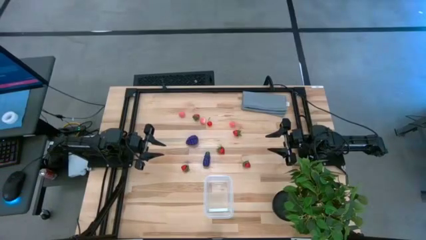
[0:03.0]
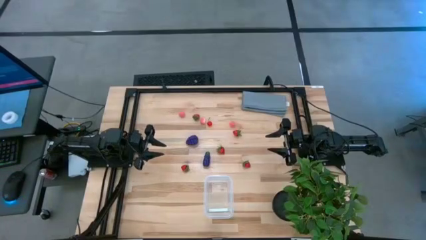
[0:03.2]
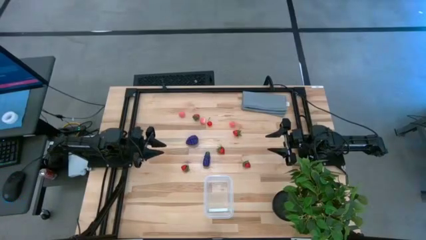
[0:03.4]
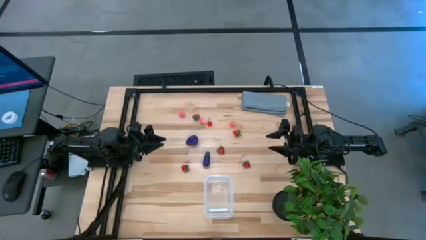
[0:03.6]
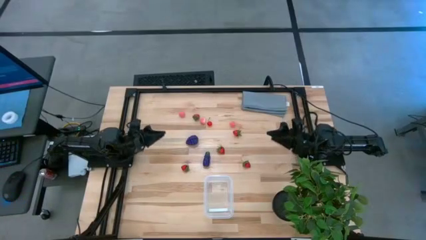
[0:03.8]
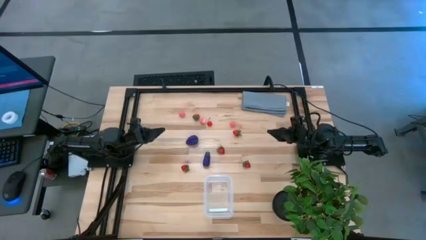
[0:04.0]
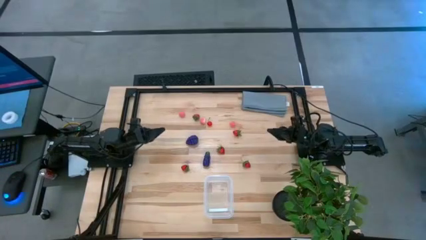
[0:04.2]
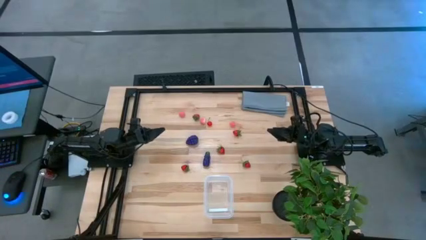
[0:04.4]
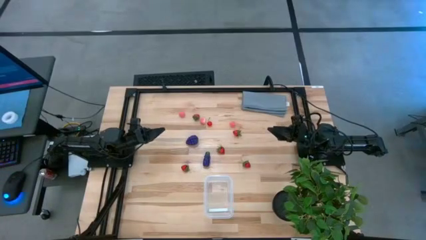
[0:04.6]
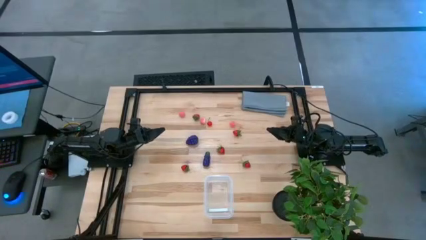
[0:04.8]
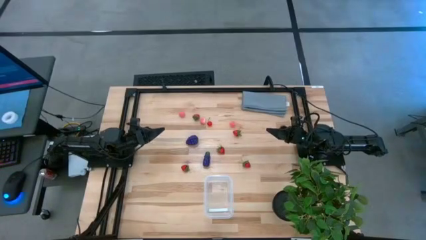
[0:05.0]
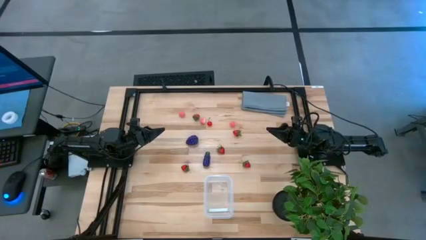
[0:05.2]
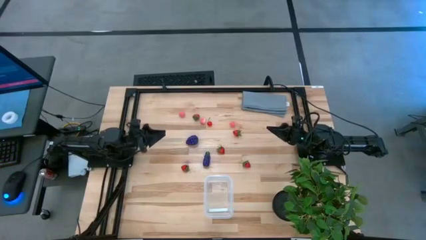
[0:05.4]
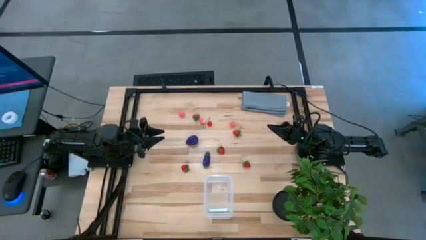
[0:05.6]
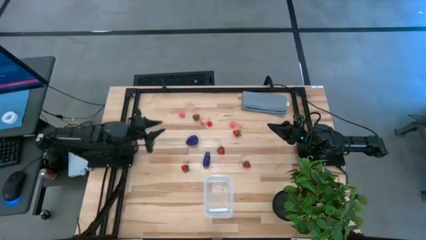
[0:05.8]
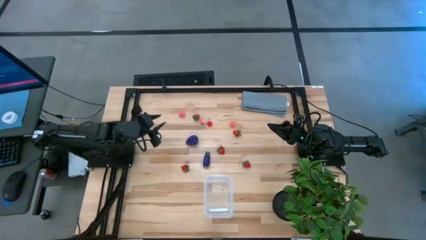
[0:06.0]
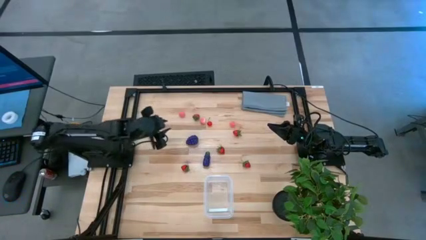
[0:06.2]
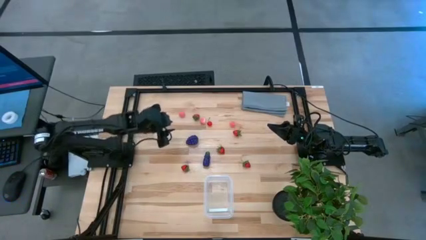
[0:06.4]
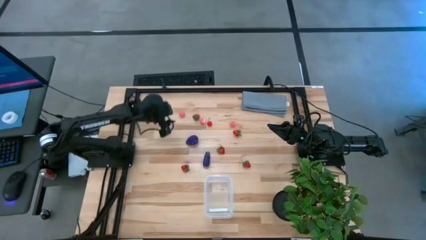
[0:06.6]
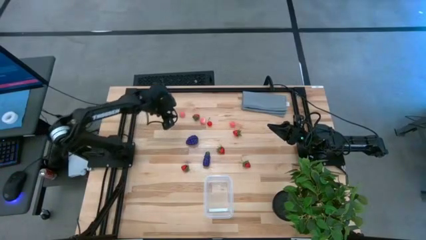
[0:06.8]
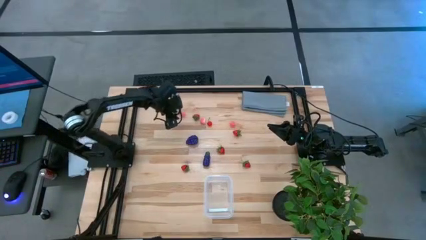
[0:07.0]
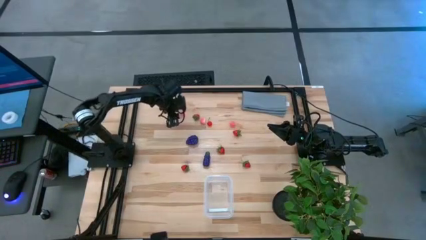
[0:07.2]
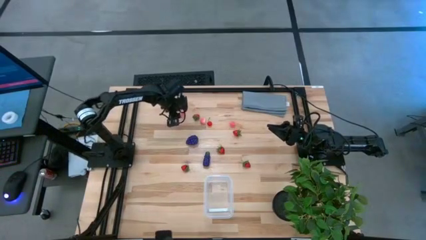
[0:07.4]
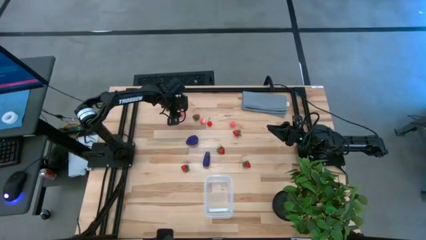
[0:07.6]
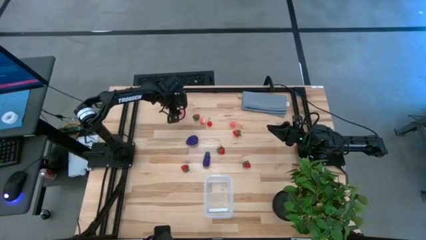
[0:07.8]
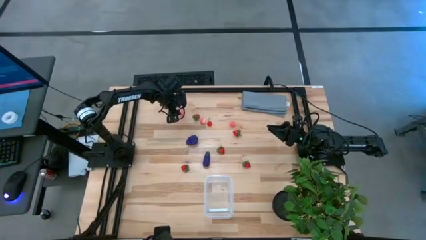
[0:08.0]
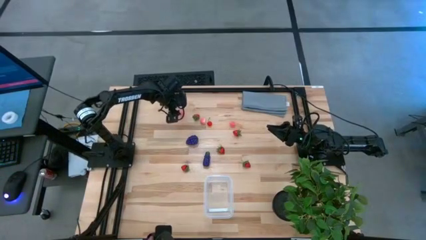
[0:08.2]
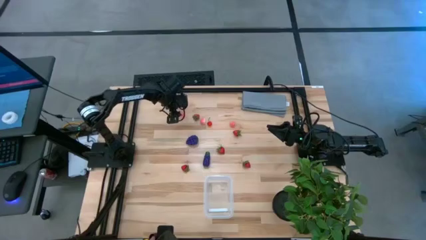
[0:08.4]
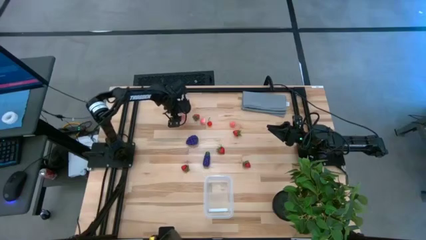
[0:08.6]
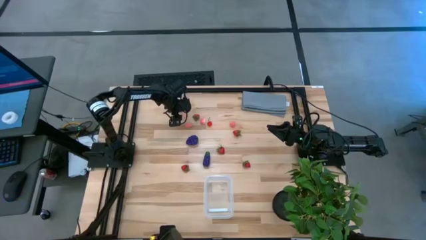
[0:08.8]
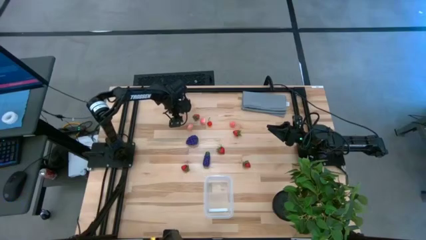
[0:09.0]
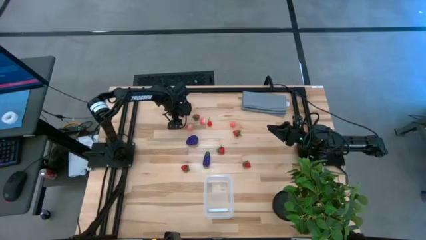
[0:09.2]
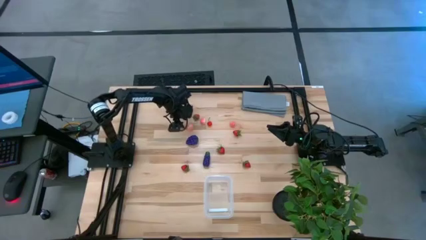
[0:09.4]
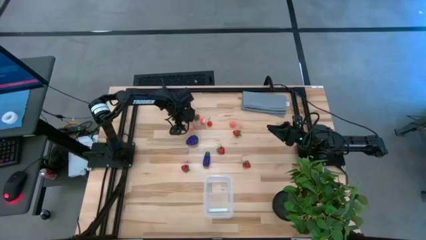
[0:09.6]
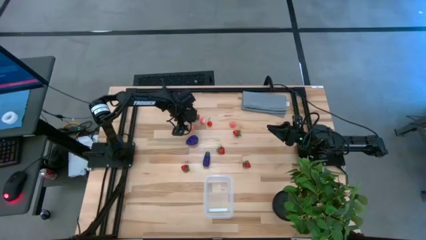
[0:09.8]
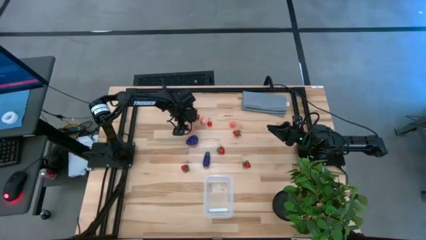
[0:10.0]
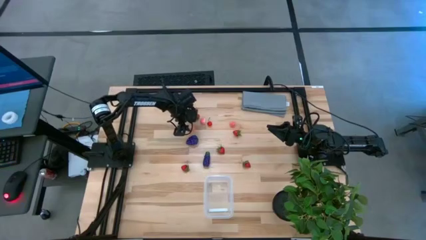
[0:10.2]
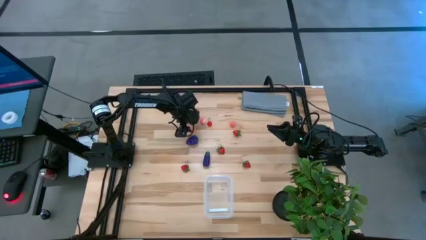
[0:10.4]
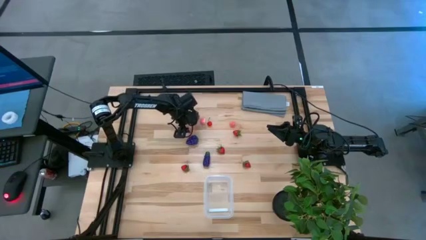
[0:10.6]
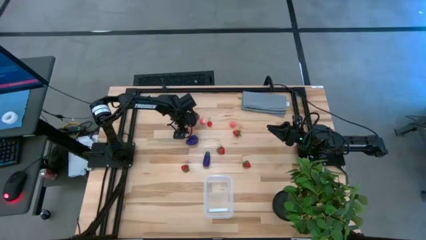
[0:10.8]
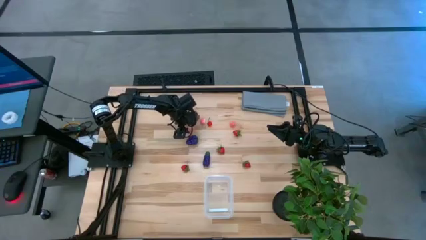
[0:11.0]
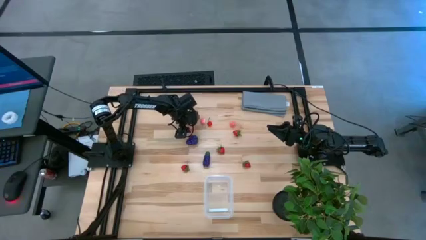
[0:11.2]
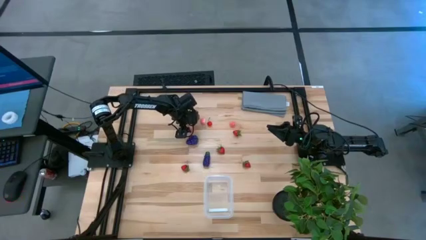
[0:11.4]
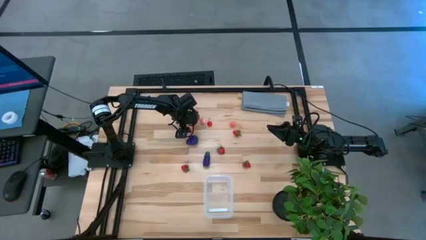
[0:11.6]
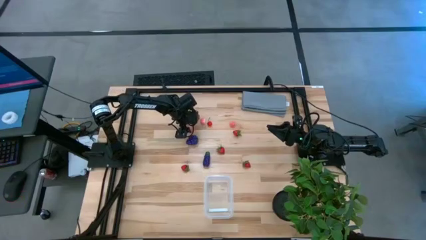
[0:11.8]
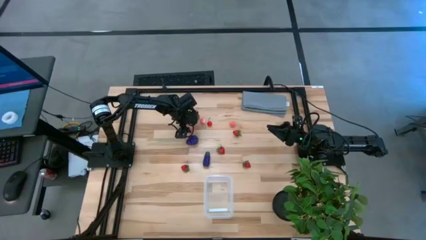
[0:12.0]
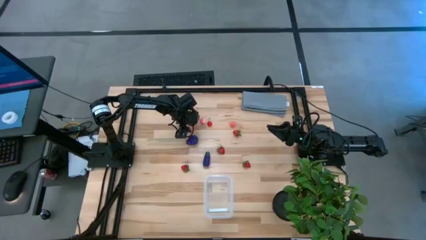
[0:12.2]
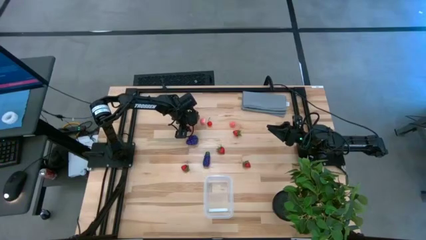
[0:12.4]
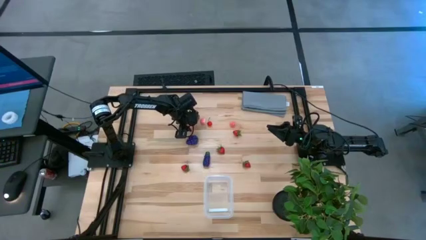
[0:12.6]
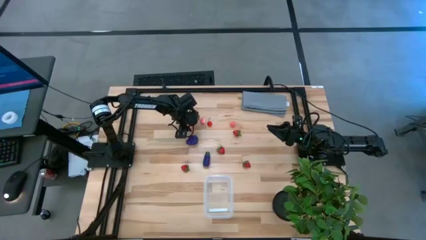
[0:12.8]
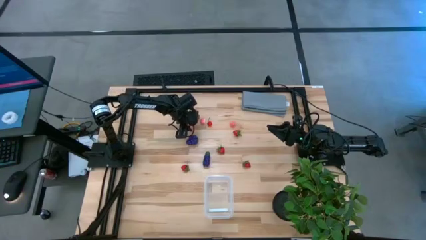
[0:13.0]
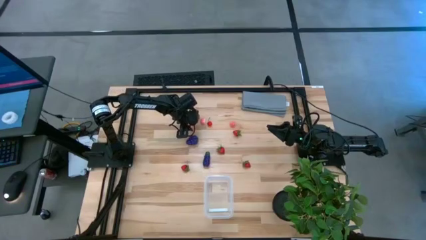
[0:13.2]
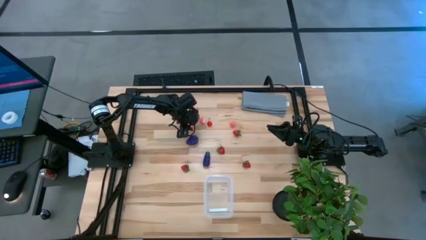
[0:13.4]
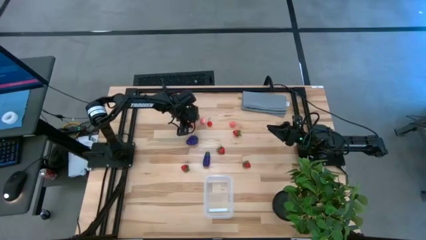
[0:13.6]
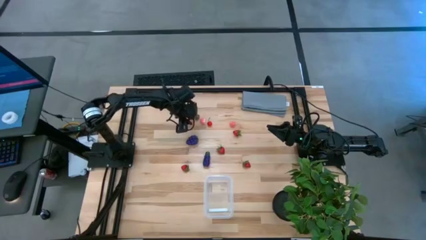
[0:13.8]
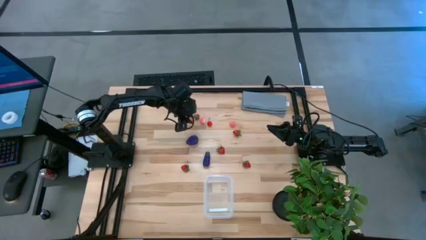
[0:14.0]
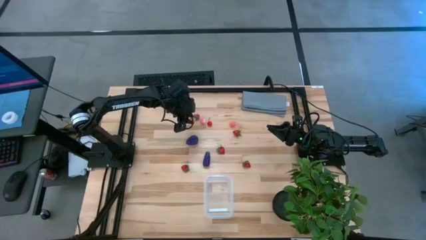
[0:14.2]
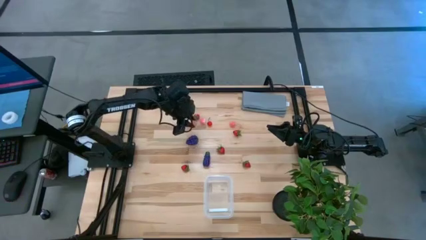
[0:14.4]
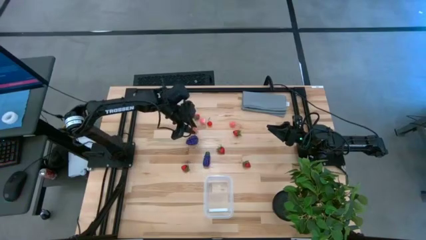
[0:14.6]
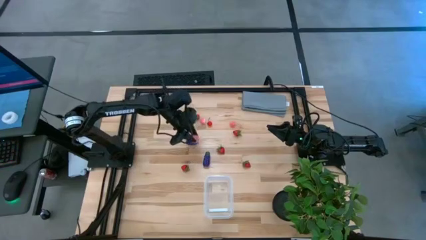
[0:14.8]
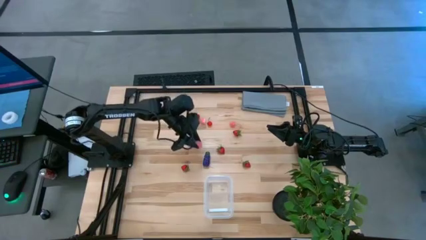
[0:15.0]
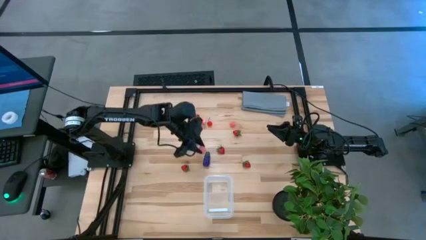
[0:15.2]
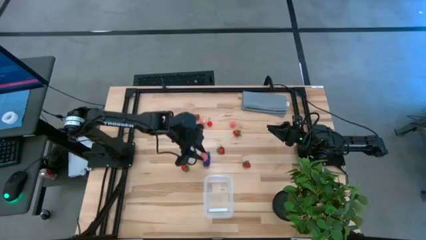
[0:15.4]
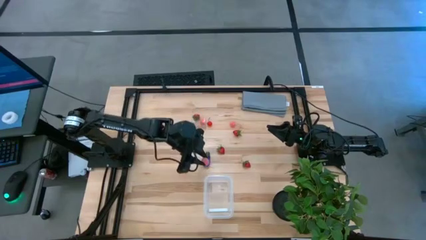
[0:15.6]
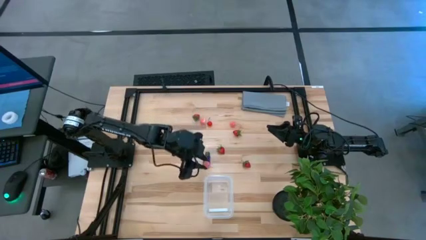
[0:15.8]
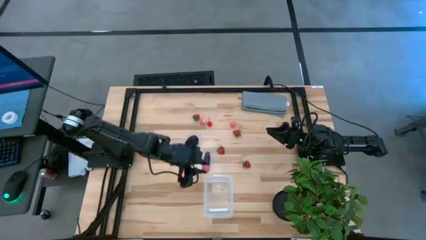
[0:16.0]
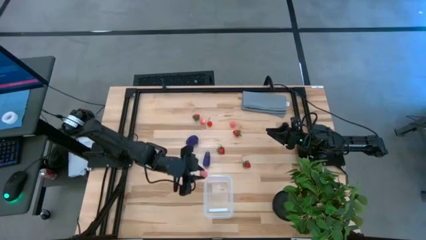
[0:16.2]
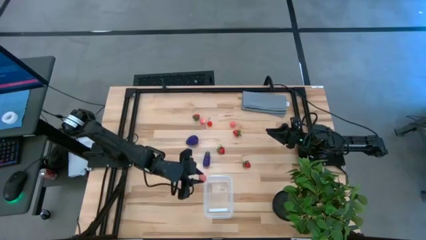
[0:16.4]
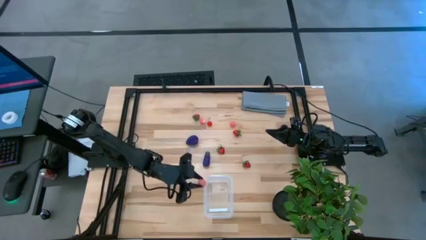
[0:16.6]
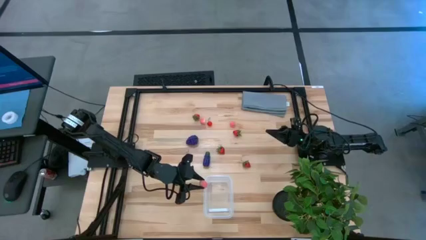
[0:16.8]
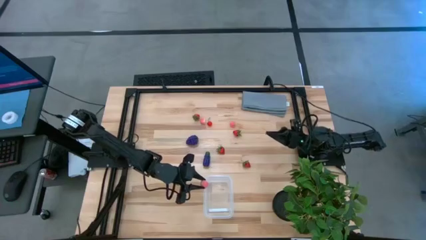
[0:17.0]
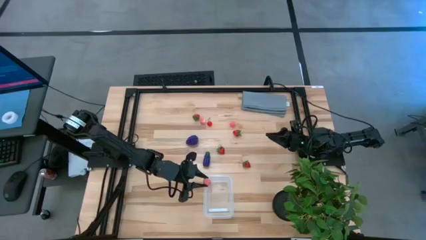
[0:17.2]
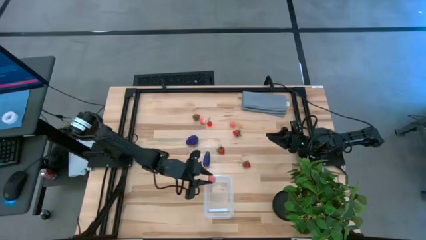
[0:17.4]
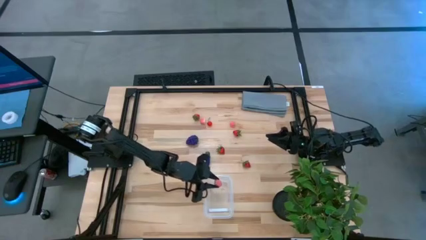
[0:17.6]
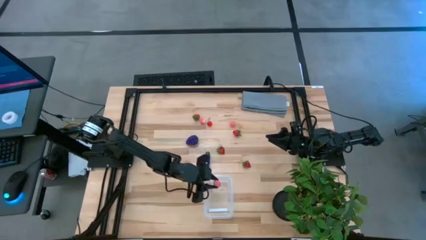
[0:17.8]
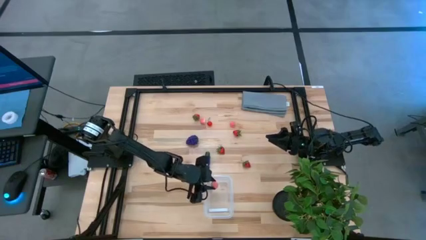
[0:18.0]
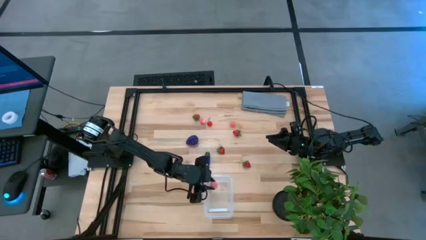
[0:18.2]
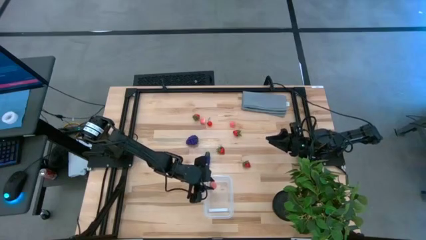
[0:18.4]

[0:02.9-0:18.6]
Task: Pick and placing Produce into tupperware
Put the pink peach into the transparent bin
